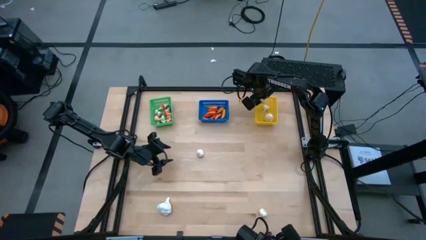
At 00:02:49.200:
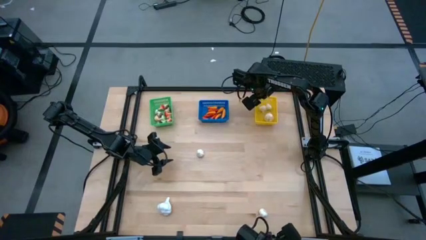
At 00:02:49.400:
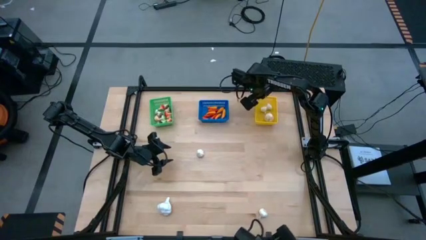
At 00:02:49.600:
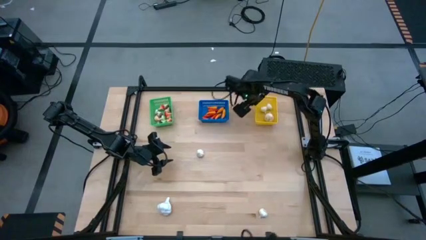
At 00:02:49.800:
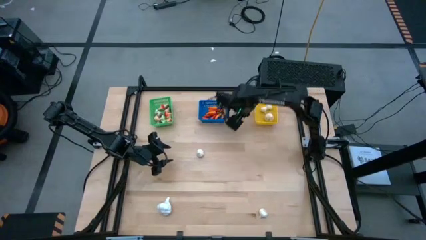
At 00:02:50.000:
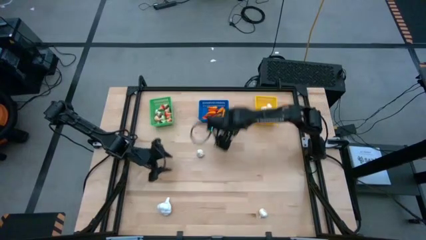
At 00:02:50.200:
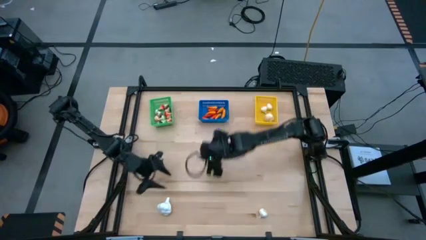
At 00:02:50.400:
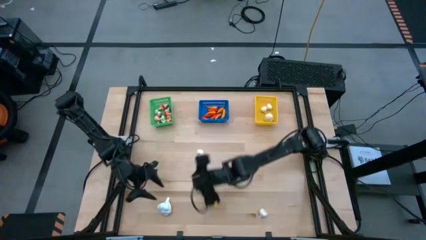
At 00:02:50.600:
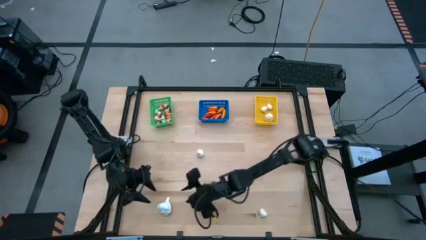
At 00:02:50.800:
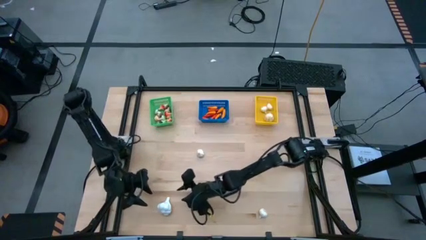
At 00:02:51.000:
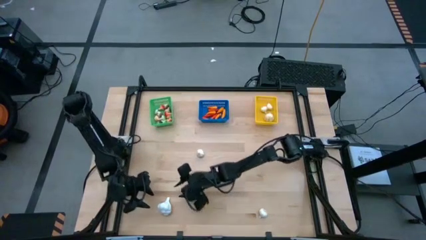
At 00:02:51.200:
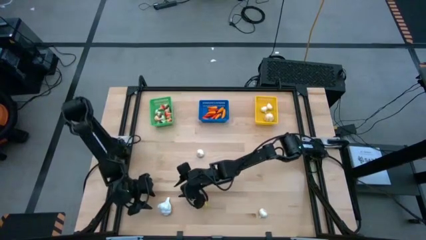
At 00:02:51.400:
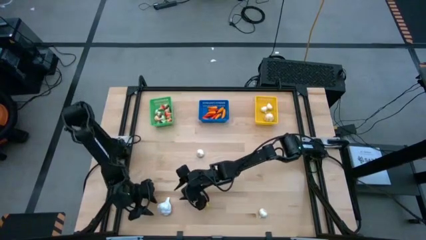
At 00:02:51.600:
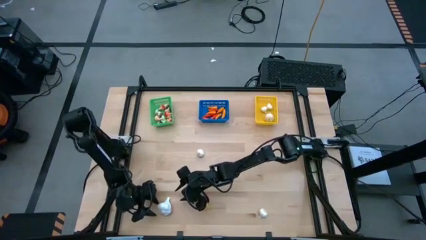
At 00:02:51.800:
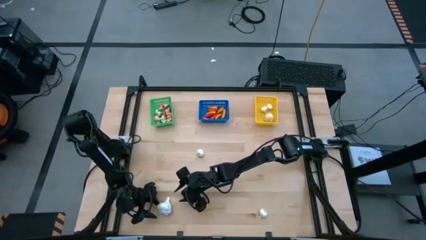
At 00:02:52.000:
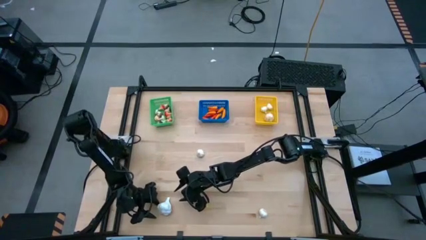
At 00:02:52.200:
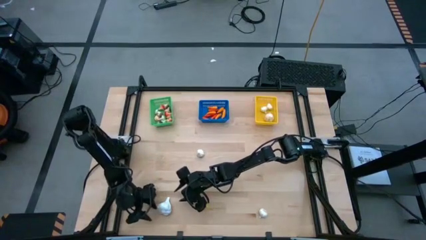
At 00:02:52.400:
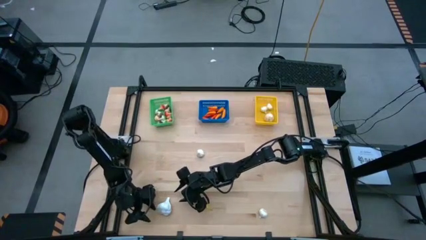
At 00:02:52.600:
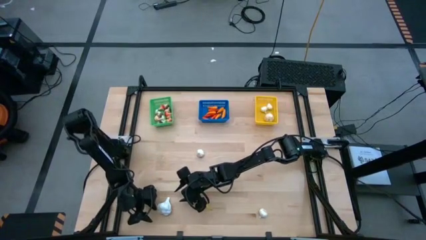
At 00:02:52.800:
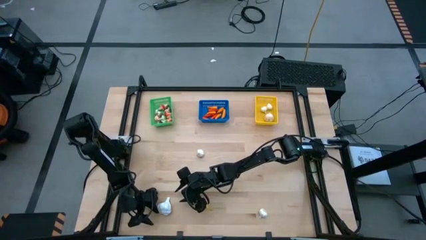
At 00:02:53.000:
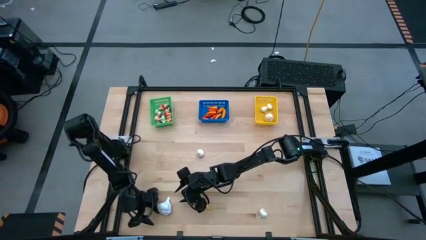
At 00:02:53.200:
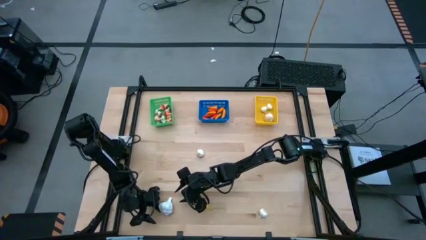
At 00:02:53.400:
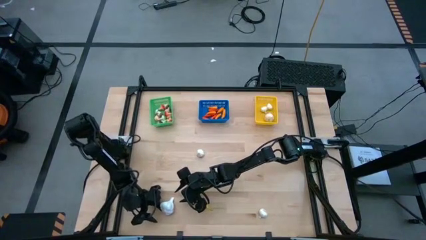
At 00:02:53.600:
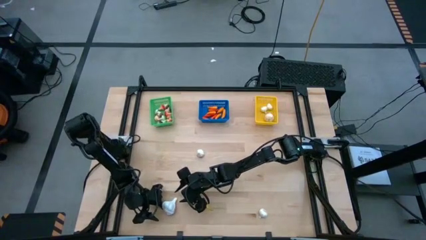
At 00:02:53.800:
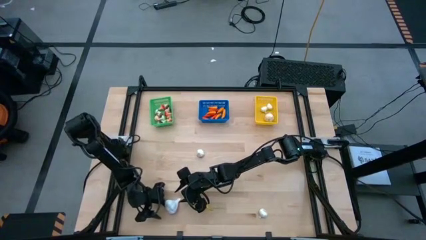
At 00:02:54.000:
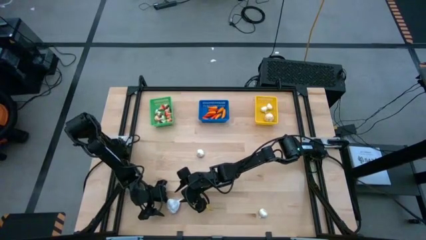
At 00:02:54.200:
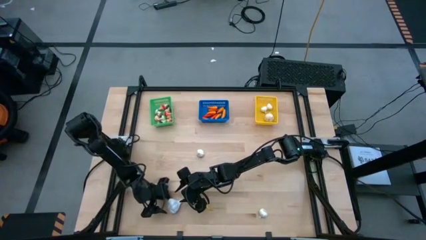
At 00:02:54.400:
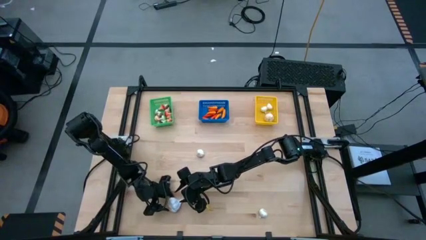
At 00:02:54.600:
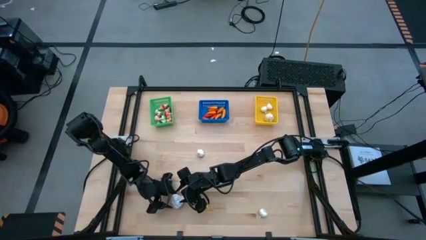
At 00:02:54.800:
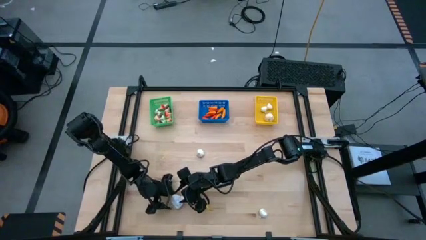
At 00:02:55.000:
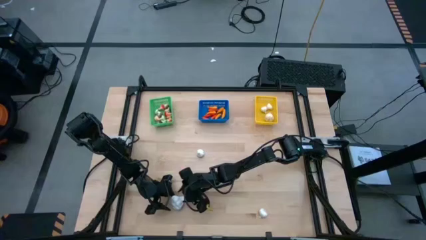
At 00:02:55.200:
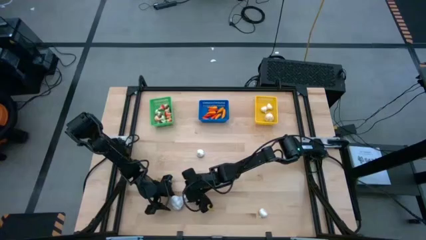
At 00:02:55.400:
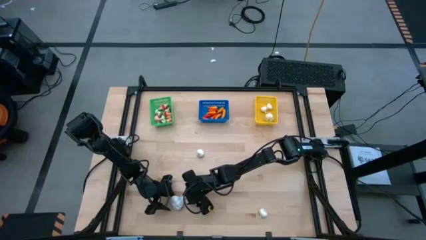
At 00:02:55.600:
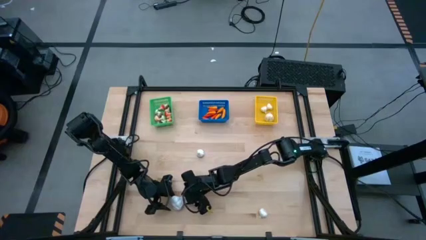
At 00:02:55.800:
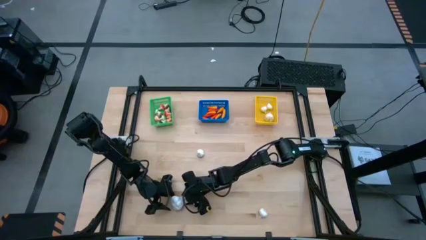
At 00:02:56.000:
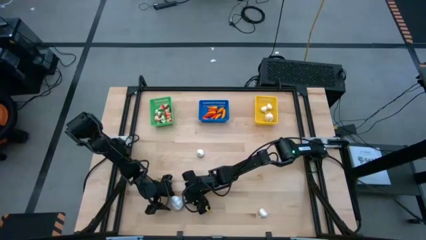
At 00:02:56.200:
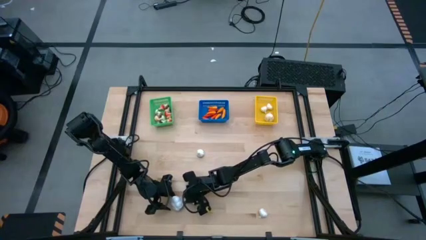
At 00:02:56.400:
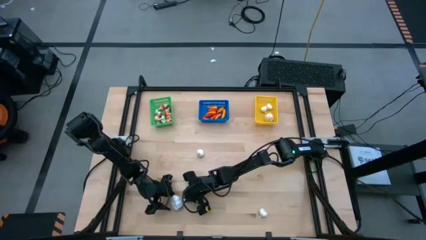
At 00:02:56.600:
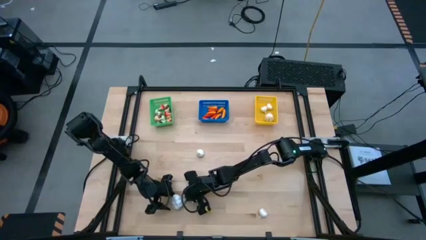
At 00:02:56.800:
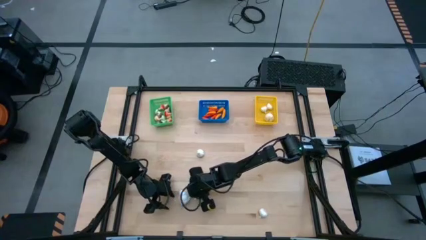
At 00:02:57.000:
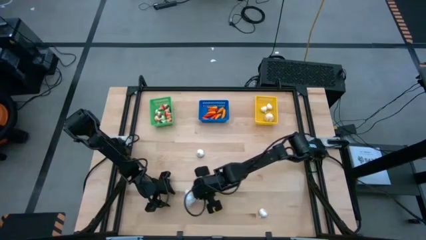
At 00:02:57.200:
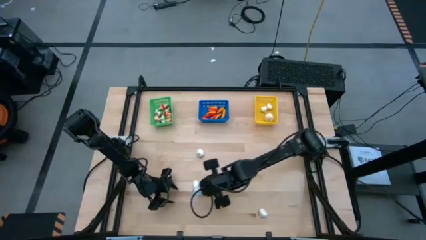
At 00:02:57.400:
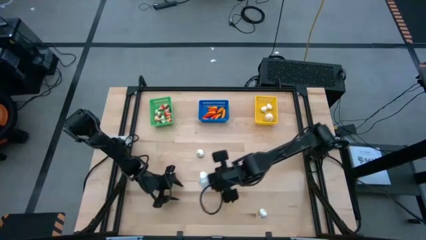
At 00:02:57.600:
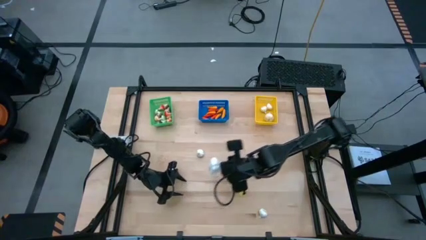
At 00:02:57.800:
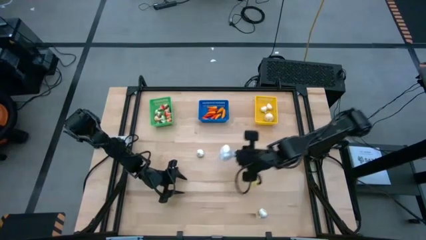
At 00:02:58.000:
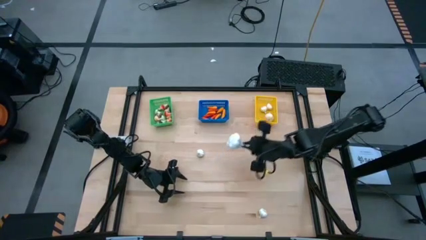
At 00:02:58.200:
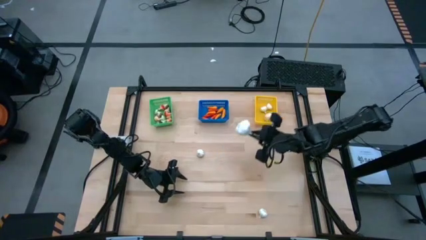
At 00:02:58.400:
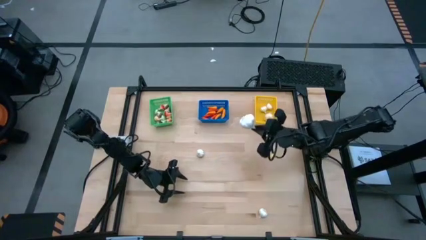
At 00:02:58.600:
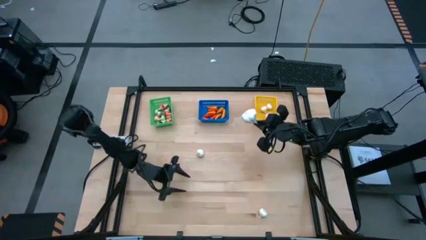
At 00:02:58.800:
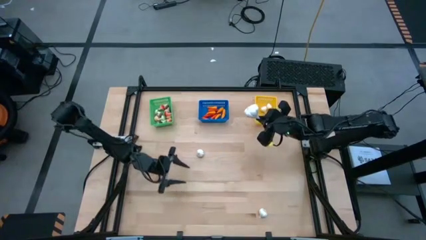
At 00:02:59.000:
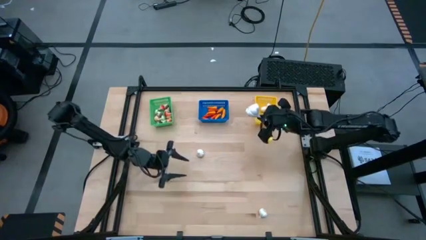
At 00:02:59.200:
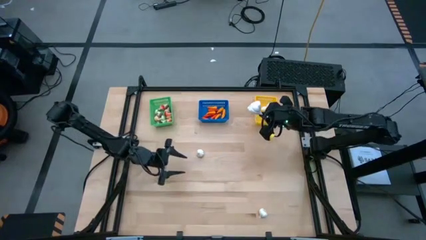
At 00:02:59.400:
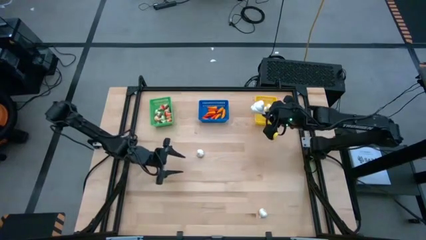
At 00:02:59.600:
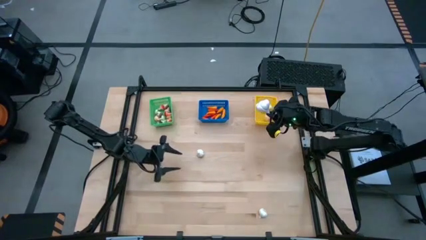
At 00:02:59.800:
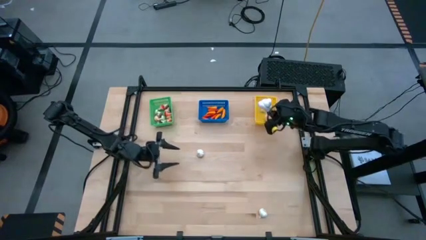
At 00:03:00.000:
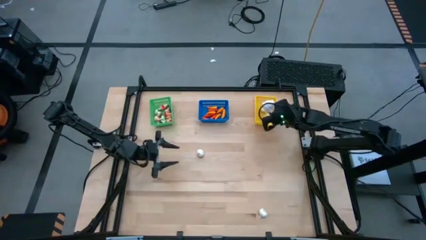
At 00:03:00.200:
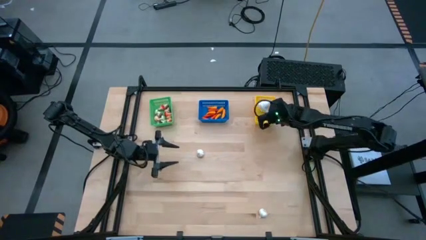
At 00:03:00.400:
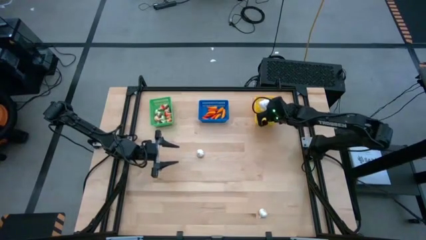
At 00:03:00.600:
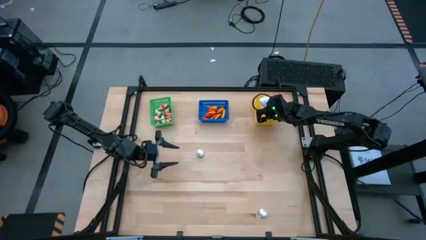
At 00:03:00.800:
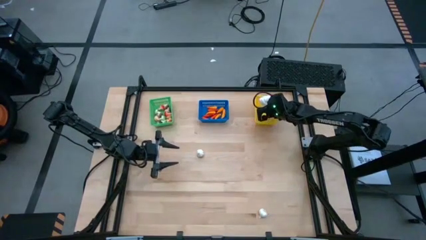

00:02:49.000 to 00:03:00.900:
Task: Sort produce into baskets
Put the garlic into the yellow bin

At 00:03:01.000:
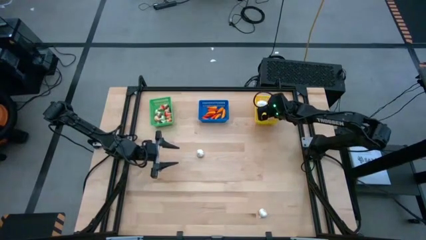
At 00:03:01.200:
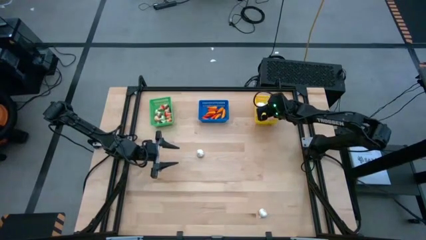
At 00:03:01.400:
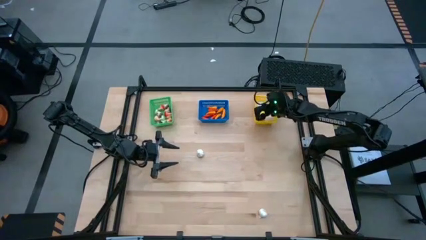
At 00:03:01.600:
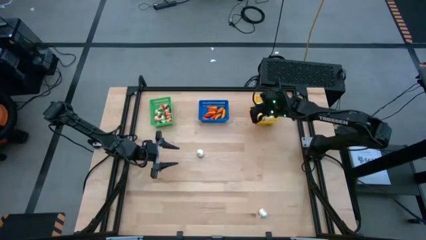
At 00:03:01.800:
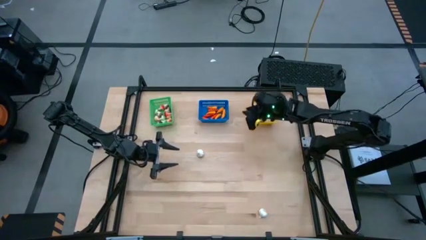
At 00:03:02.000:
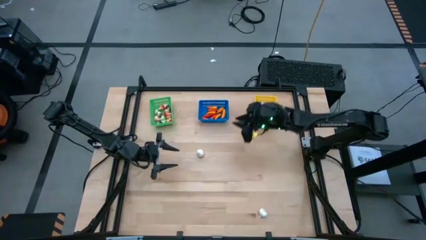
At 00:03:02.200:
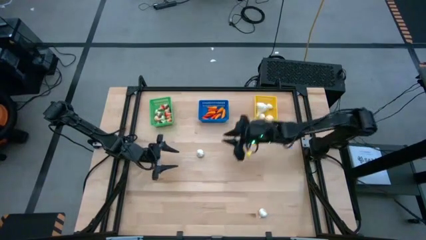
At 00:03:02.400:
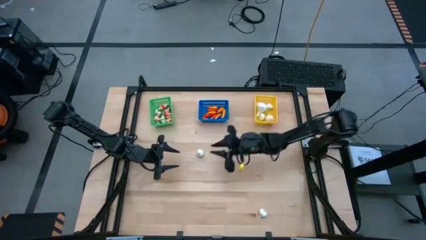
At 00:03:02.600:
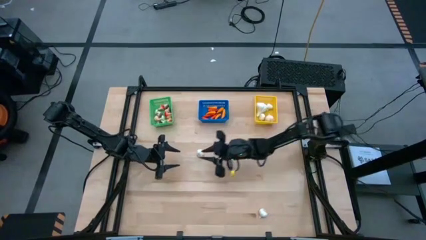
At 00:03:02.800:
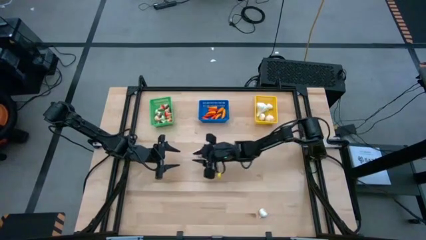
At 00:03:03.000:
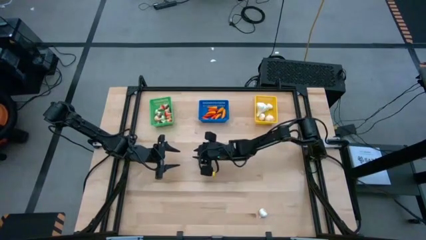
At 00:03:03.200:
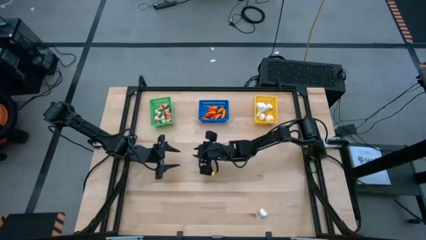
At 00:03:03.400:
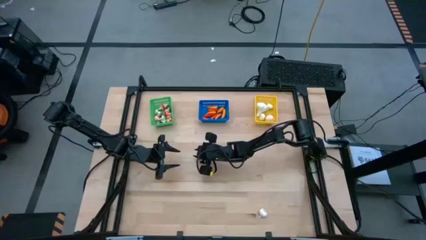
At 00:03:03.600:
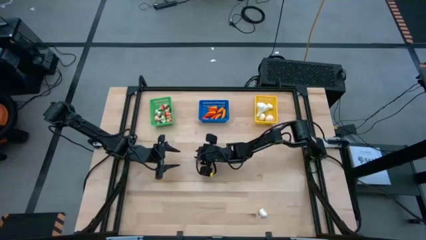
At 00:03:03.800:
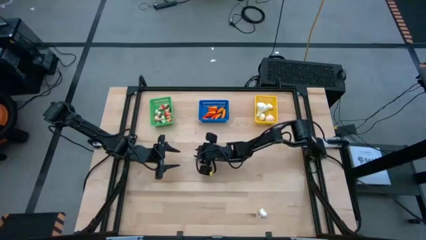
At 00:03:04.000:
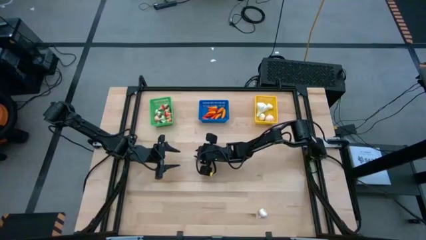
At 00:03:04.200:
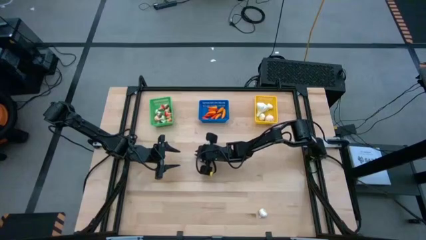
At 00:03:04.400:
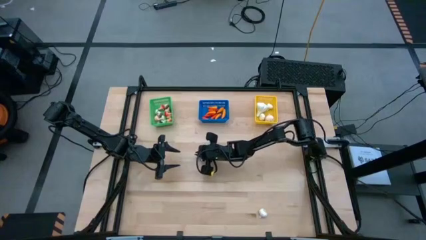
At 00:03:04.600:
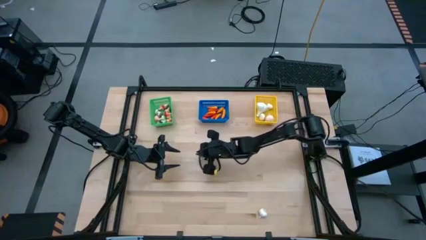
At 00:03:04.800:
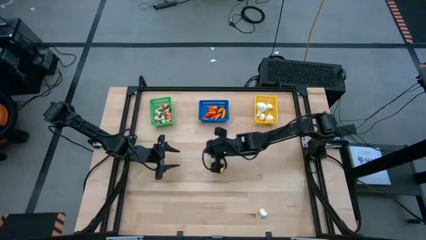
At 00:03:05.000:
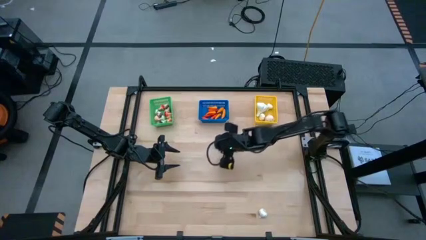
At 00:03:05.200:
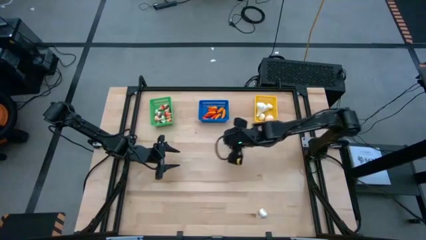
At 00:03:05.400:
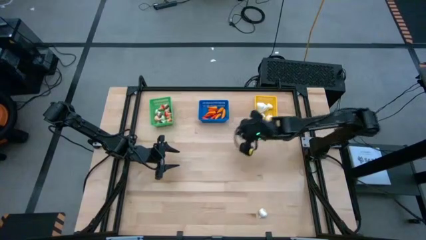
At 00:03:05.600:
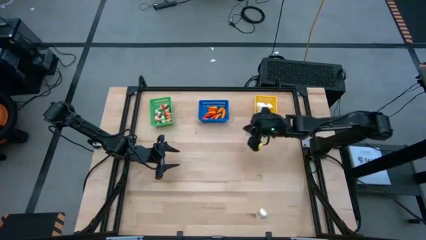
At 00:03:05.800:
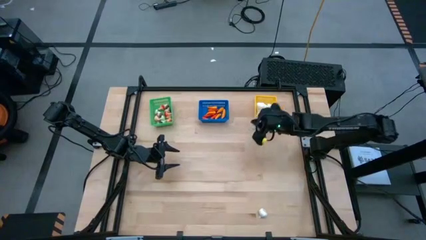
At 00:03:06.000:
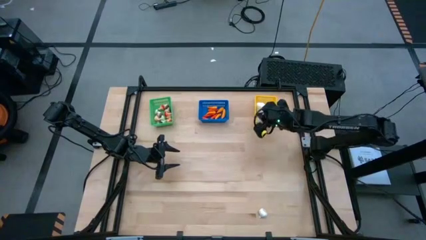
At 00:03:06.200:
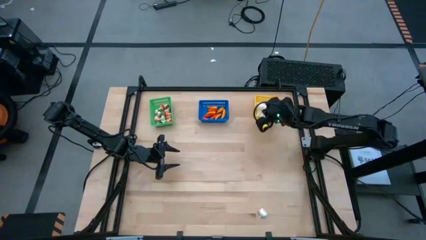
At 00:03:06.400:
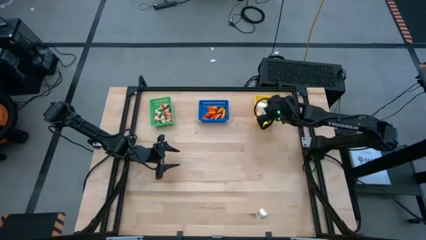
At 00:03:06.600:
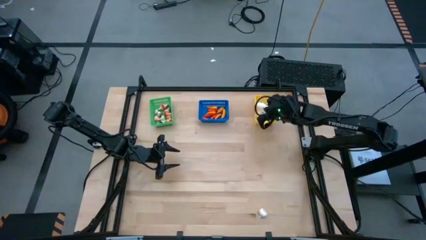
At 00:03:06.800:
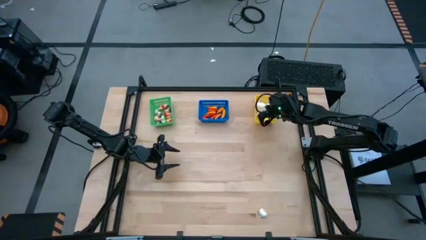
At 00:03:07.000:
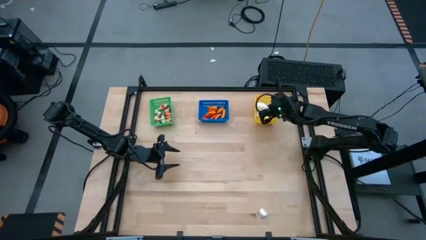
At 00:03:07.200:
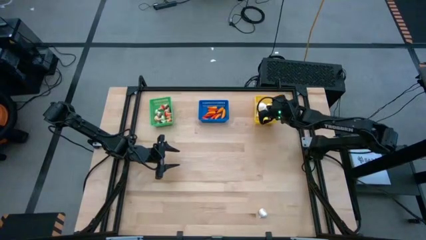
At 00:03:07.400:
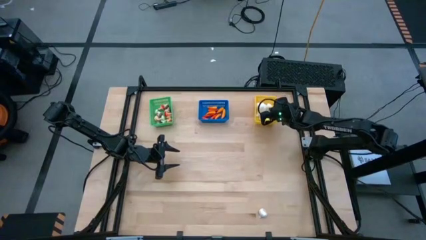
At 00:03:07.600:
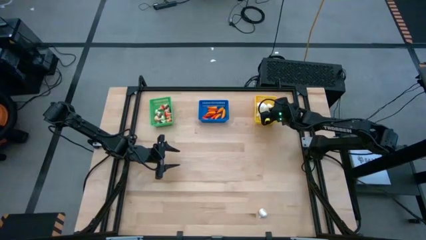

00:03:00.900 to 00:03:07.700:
Put the garlic into the yellow bin
